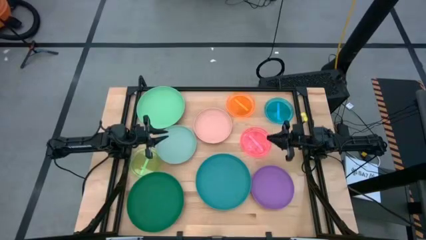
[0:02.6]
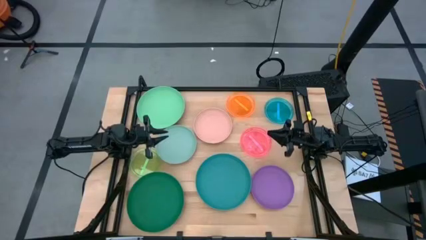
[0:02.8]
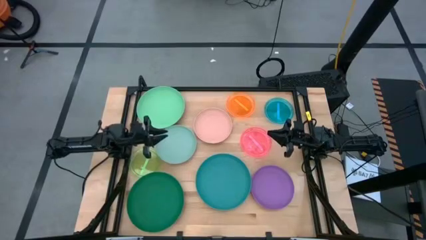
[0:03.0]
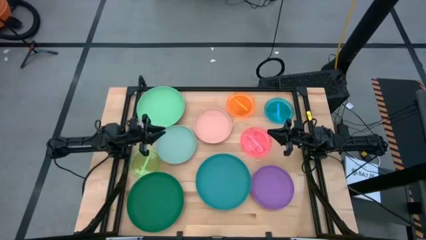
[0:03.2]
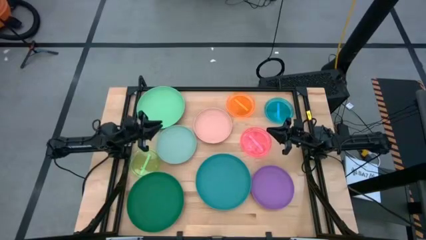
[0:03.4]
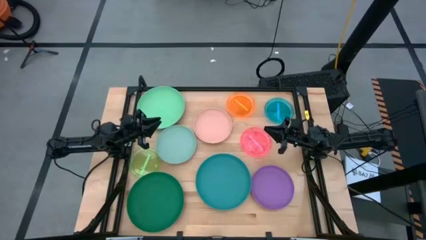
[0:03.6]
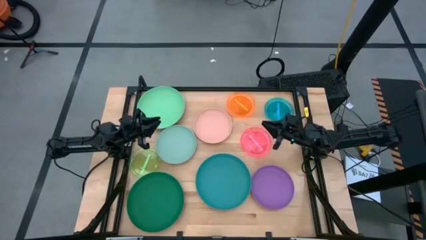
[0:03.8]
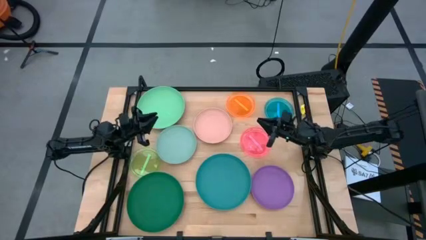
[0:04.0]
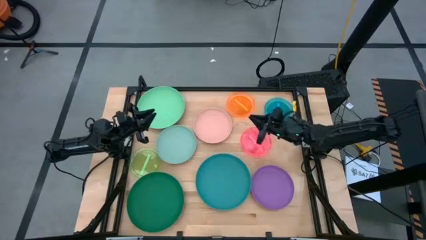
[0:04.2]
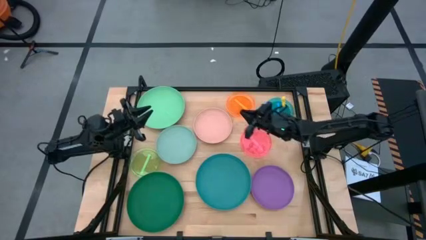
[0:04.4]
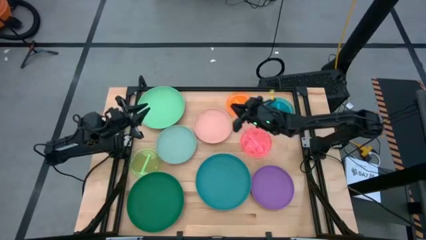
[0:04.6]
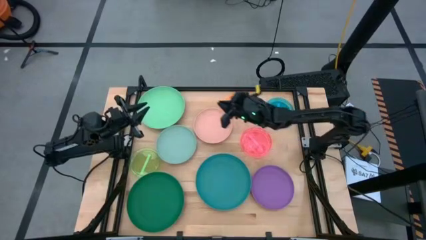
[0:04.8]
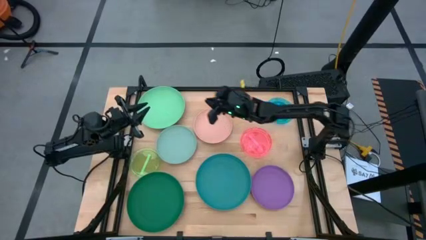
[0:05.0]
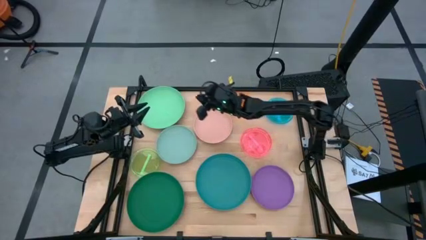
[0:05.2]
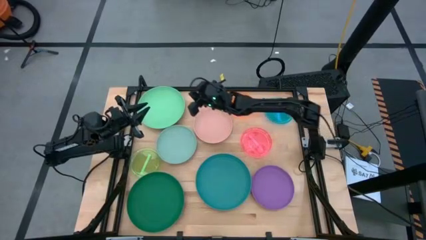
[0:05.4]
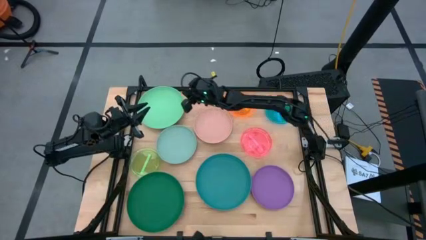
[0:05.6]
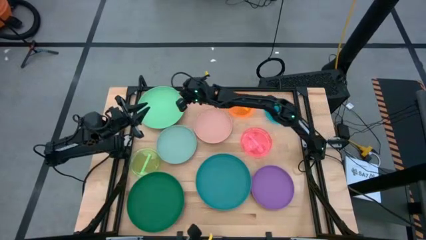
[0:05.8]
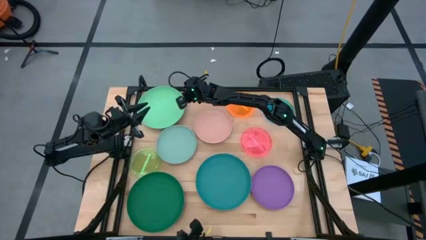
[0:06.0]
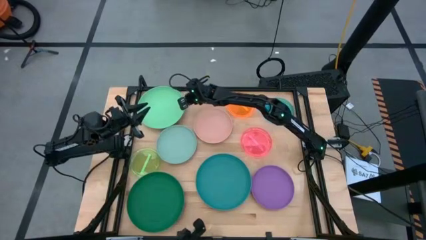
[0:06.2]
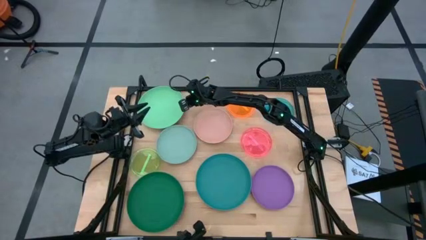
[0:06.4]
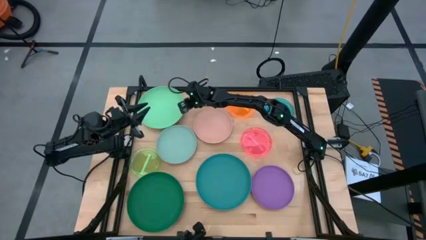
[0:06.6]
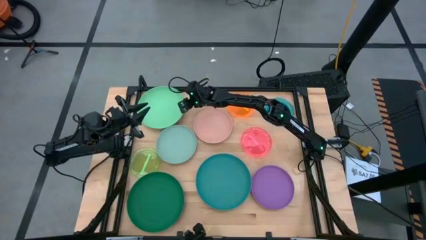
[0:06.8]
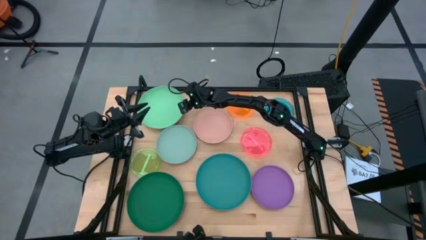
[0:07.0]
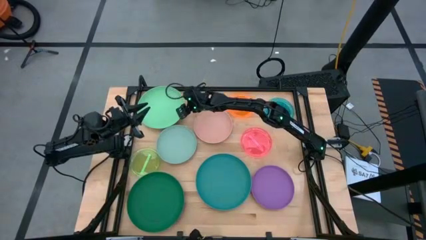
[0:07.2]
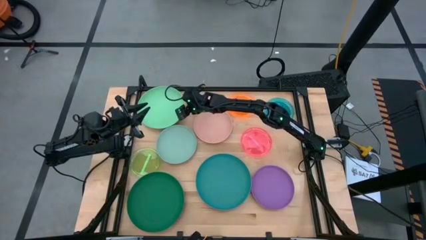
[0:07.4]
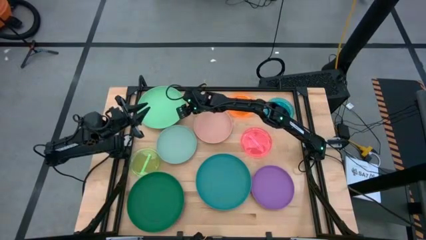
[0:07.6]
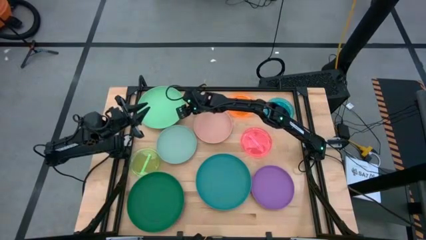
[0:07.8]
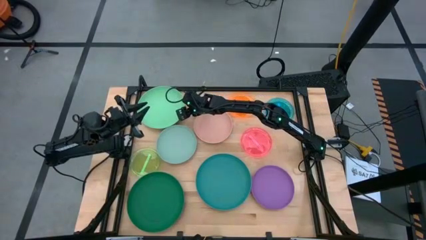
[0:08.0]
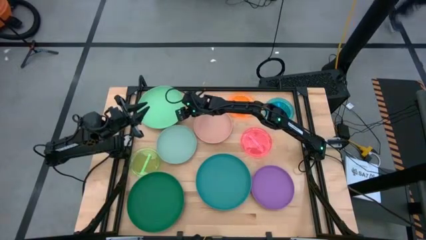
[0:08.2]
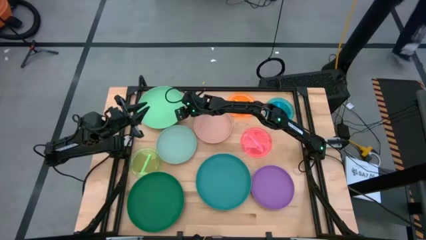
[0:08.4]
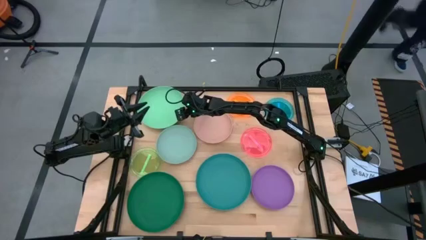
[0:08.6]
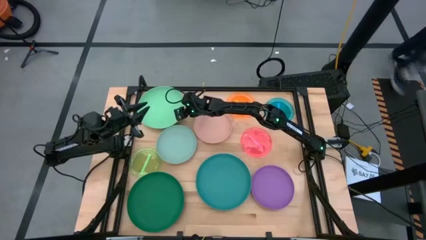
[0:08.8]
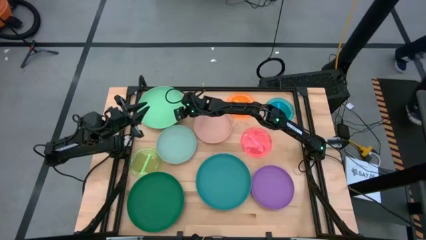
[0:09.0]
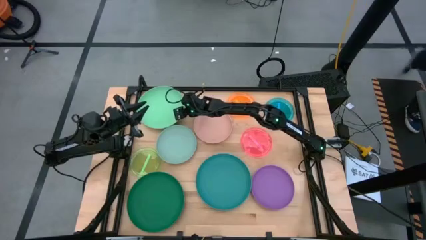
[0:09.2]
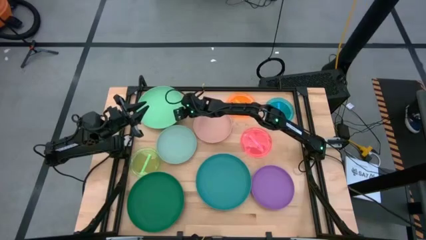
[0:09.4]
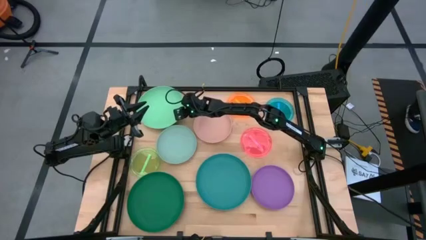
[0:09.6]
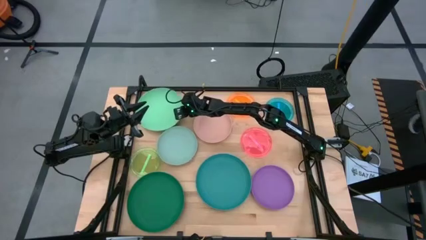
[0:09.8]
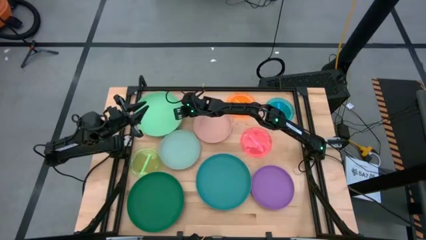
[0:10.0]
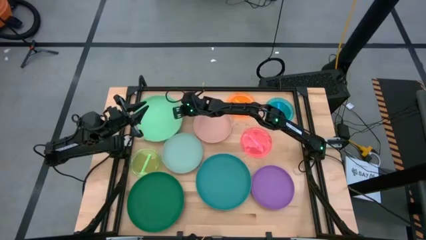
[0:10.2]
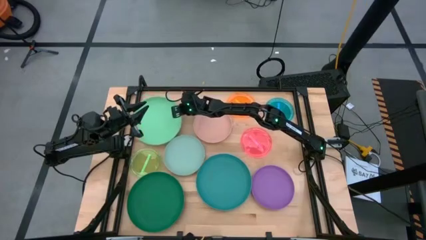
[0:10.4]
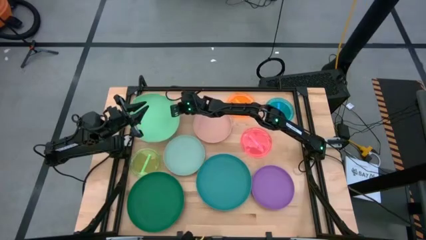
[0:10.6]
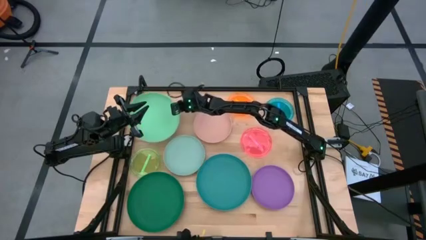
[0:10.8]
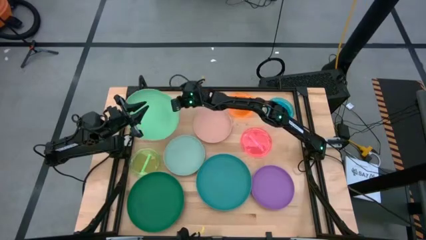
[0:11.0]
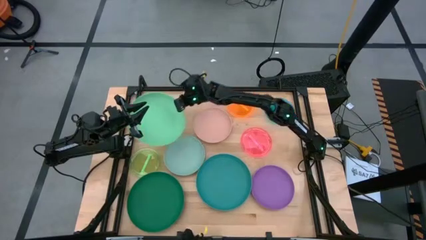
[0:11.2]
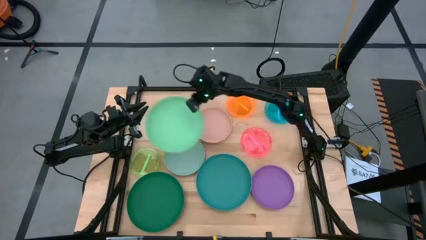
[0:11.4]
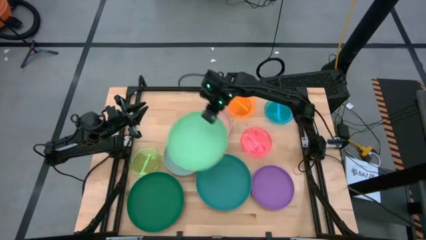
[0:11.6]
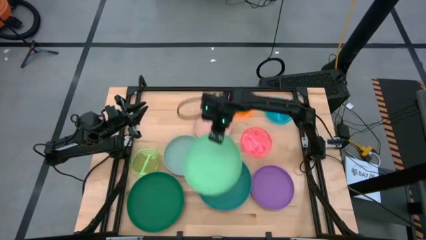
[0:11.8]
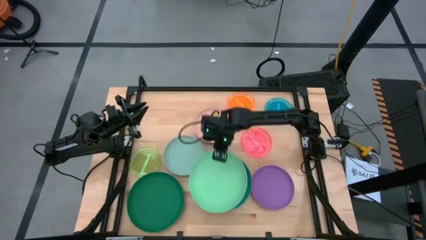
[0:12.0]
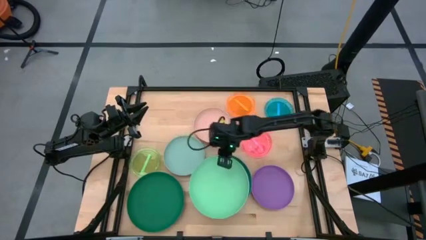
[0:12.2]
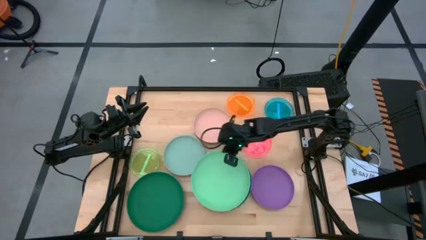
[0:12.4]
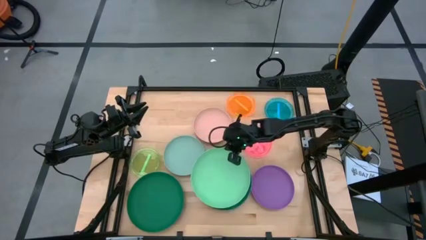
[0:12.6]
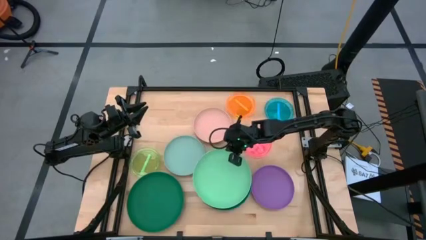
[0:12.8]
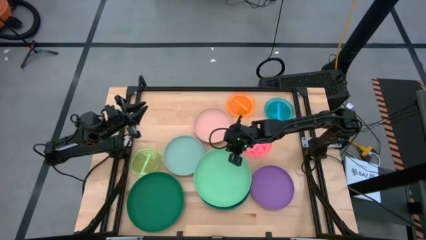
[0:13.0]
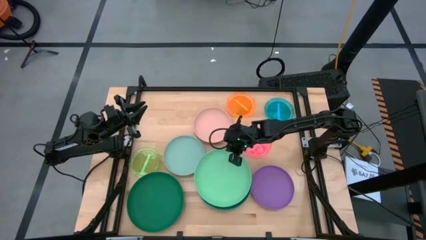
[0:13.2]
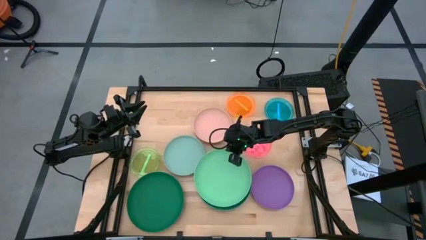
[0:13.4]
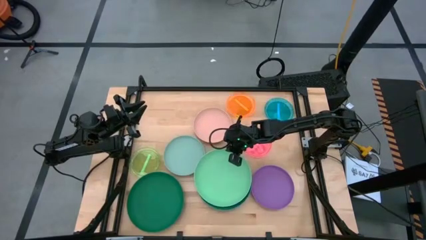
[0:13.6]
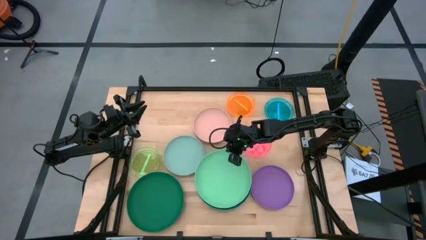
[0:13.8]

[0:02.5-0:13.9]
Task: Stack plastic plates
Stack the light green plate on top of the blue plate

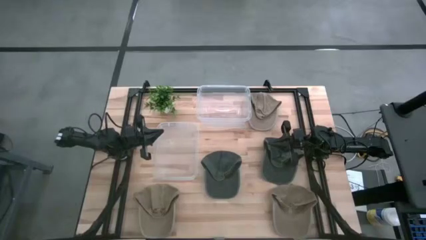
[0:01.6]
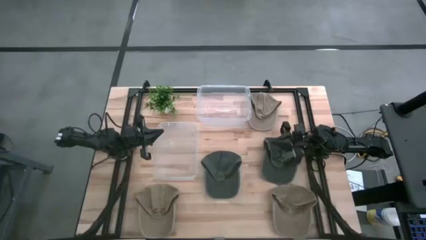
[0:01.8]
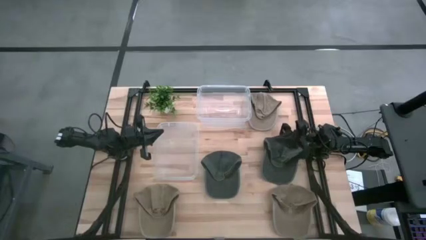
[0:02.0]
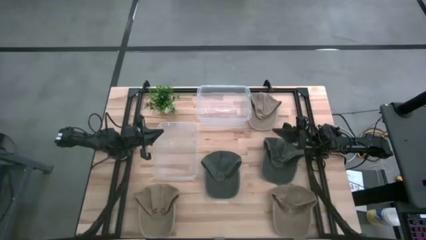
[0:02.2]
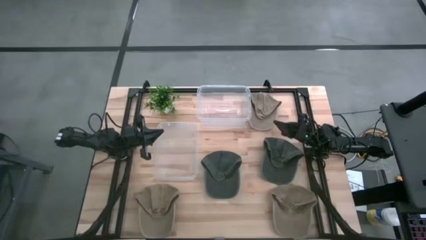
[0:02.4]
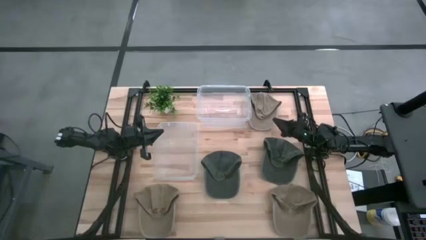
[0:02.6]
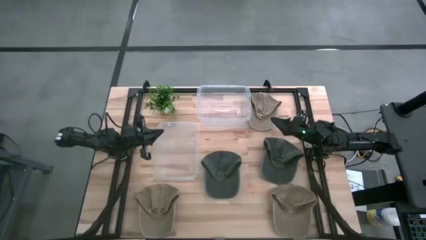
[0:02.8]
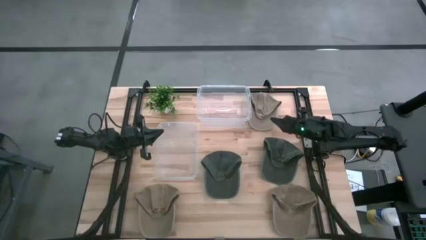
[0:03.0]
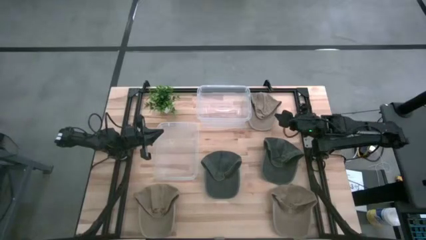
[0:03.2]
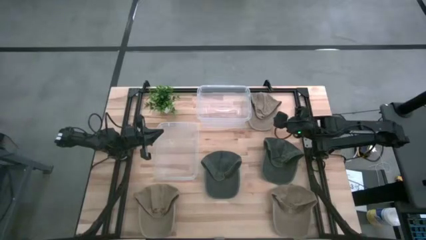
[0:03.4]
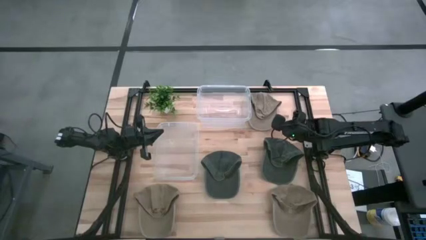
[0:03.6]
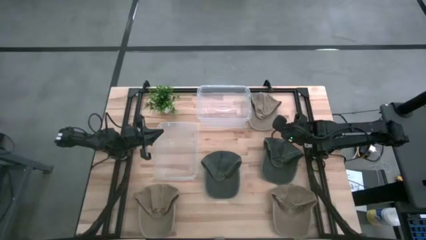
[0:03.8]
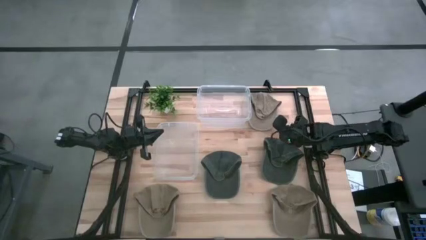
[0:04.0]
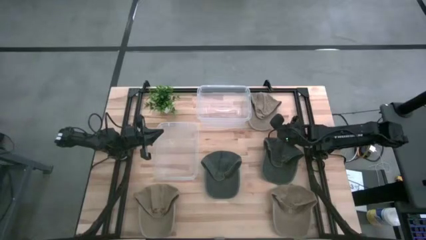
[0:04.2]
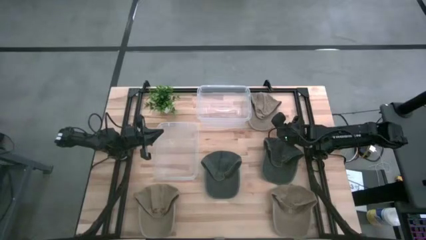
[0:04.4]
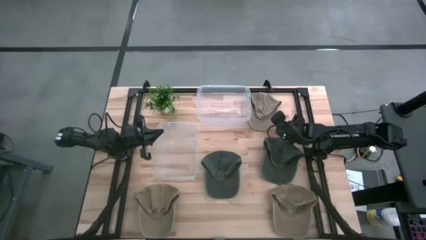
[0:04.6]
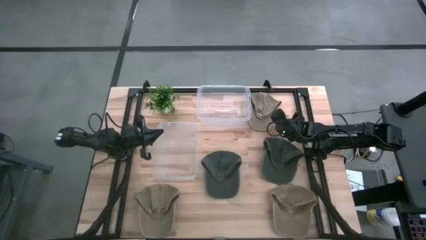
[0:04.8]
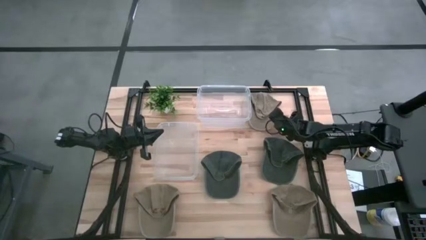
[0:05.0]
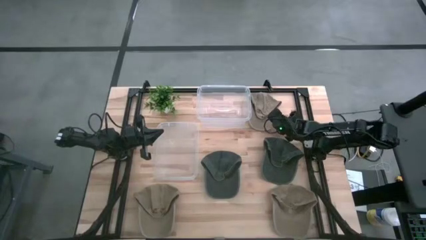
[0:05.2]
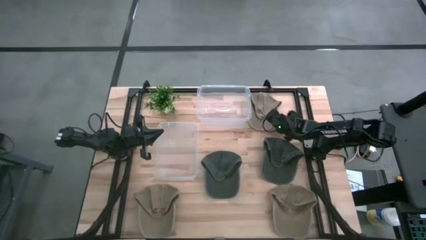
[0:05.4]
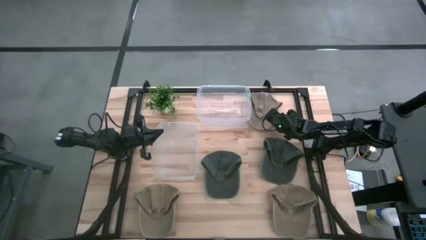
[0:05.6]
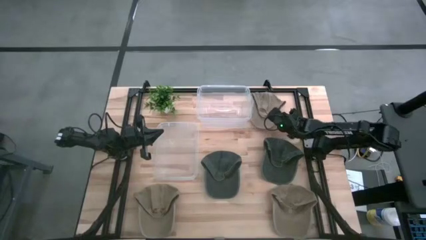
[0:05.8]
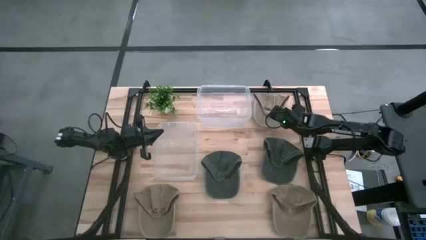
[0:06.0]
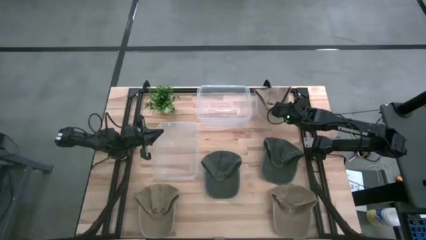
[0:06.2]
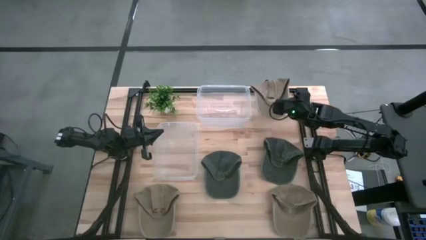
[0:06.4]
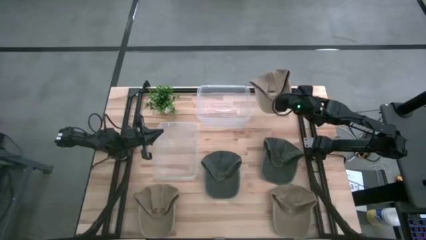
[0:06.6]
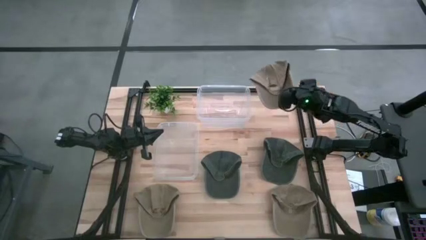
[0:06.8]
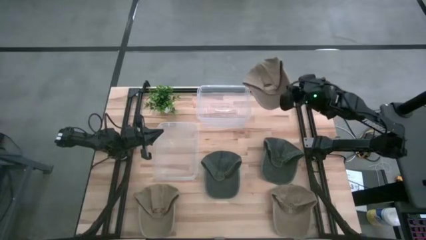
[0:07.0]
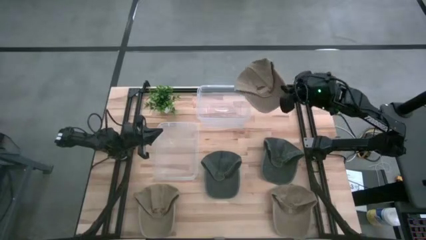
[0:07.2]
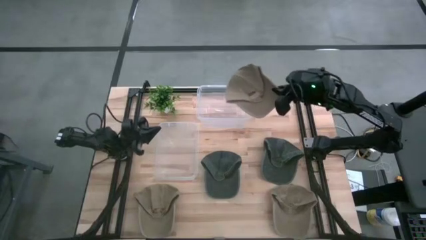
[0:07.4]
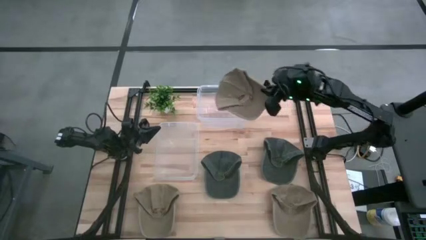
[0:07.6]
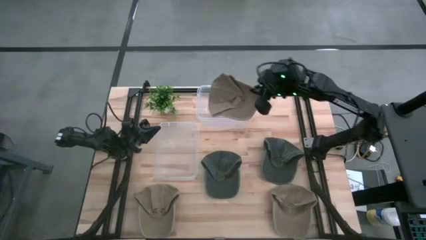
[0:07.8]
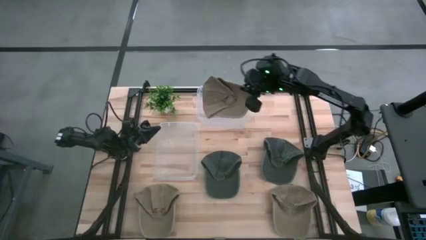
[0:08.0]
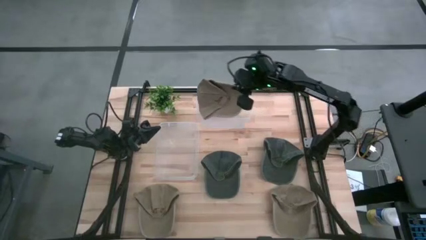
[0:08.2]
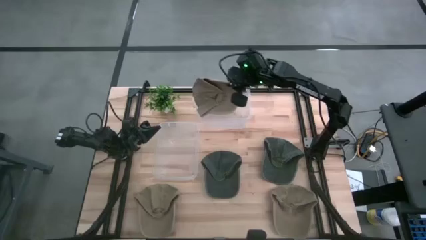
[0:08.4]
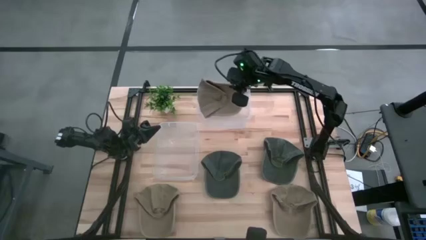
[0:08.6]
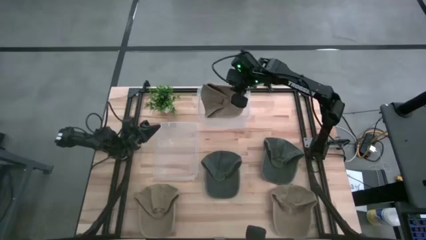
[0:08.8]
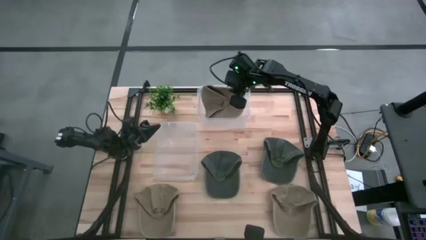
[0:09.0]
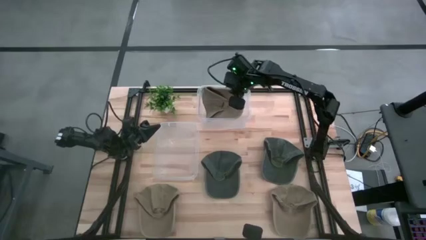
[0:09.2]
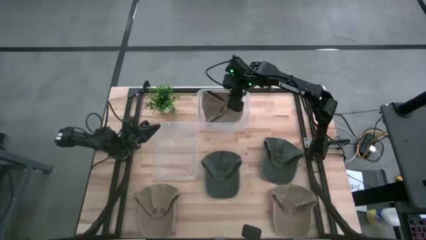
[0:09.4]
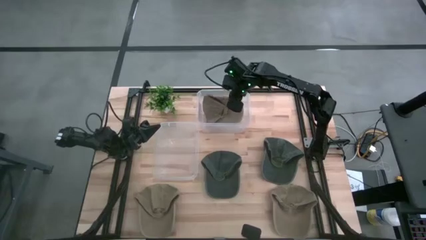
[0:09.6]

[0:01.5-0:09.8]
Task: Pick & Place hat
Put the top brown cap into the top transparent bin
